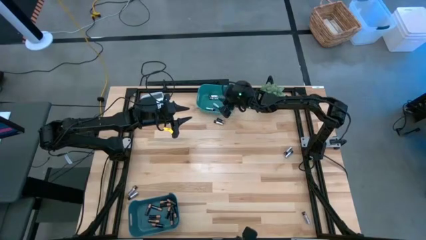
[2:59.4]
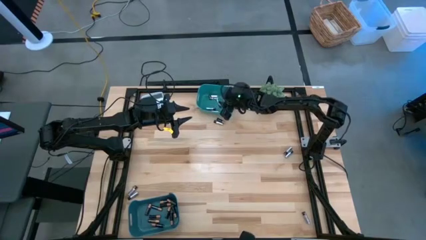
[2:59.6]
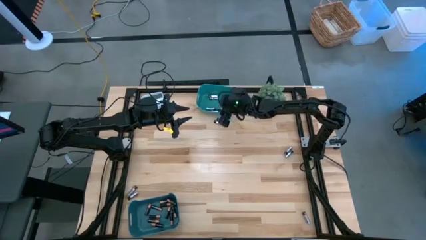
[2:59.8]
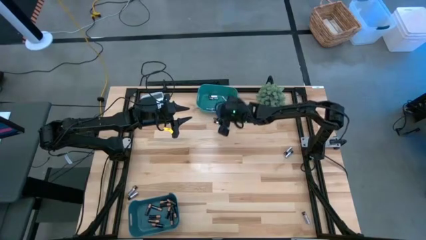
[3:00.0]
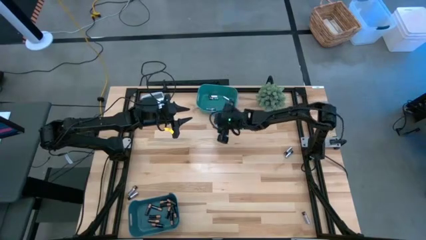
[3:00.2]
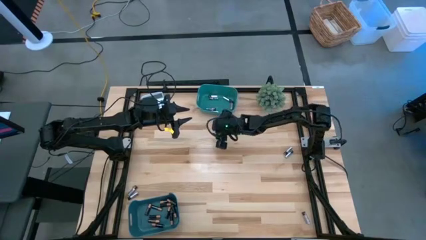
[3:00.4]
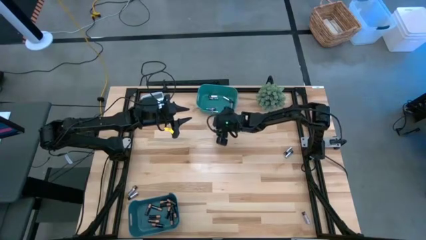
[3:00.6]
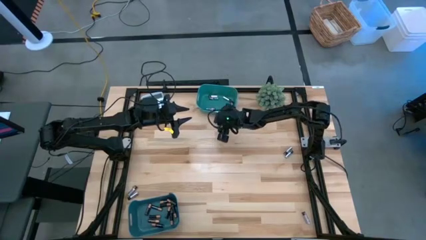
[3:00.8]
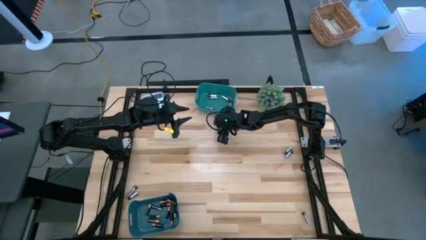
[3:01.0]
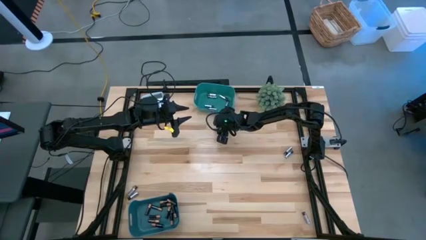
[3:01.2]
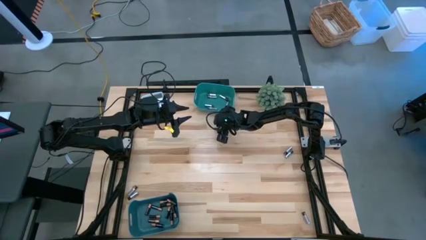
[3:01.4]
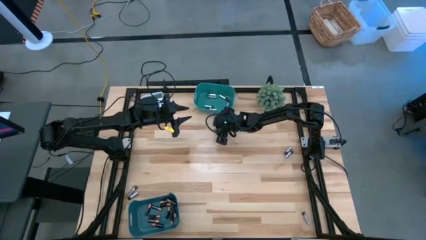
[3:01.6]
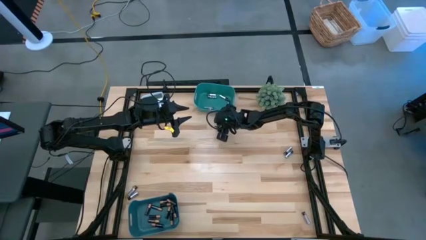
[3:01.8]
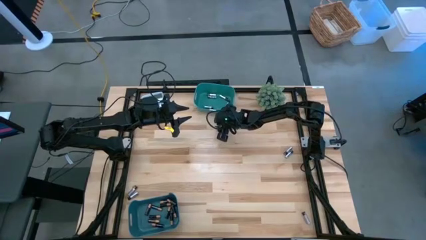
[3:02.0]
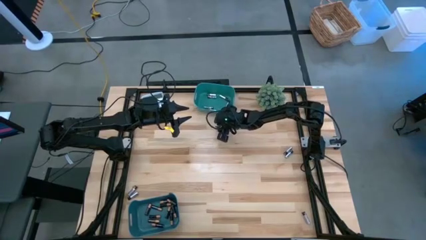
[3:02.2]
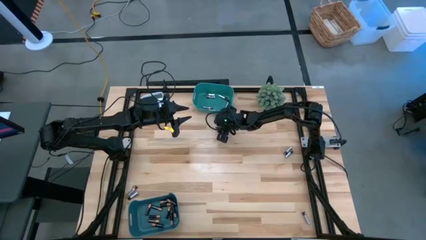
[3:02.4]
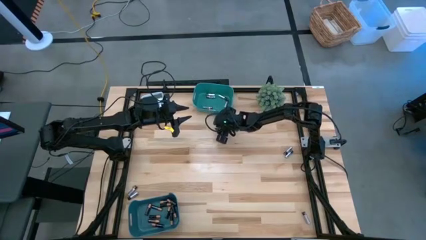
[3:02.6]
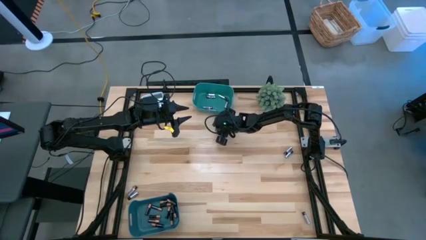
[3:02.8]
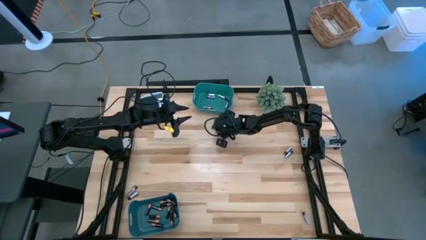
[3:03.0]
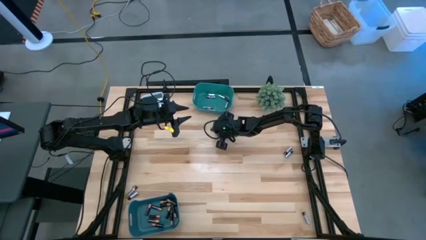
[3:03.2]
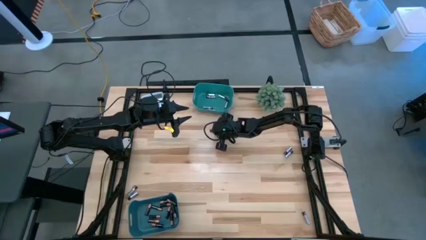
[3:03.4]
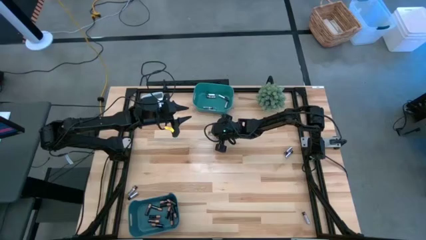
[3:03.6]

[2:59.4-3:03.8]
Task: Sort batteries
Put the silver battery into the top green bin

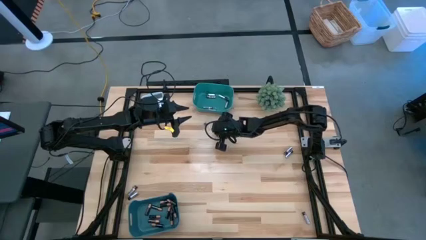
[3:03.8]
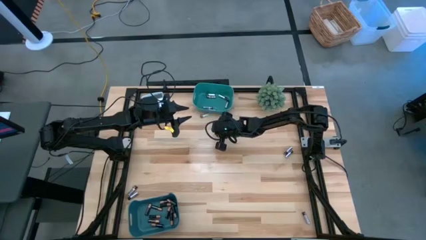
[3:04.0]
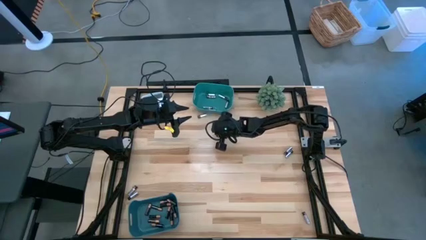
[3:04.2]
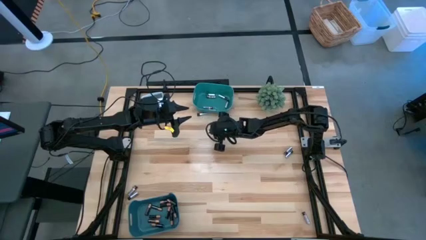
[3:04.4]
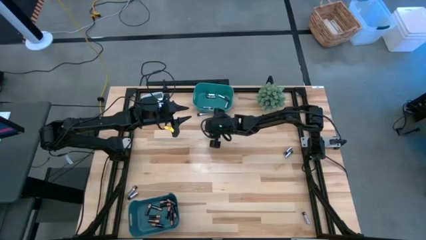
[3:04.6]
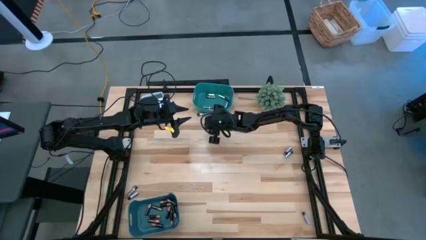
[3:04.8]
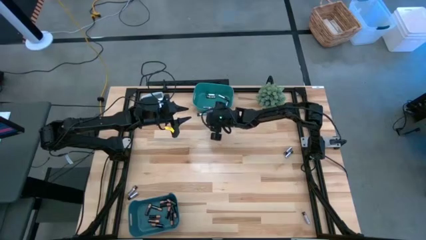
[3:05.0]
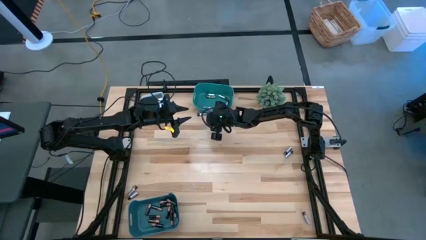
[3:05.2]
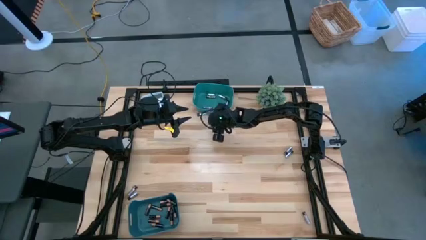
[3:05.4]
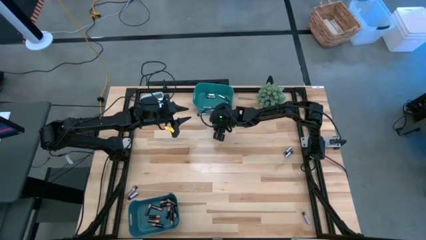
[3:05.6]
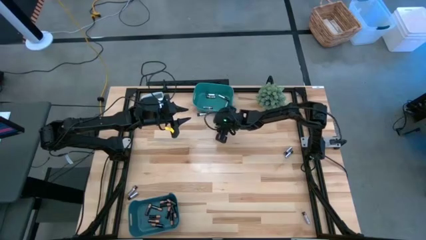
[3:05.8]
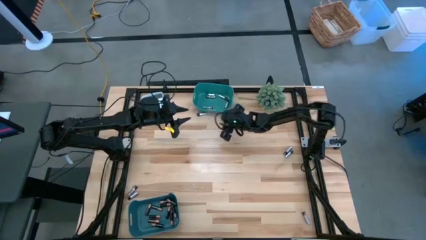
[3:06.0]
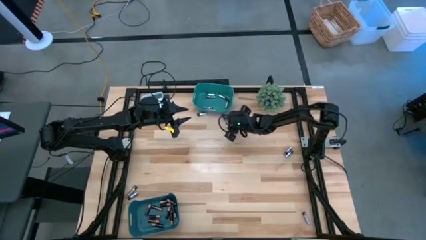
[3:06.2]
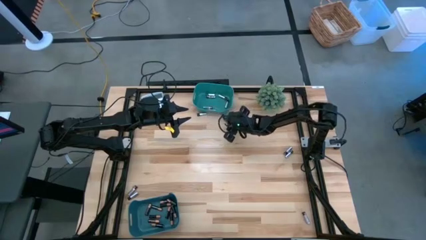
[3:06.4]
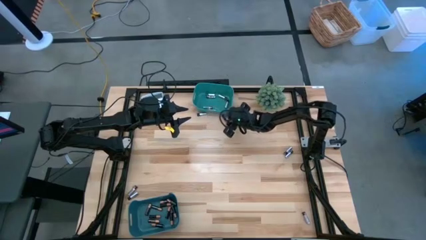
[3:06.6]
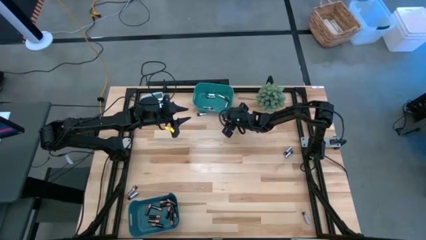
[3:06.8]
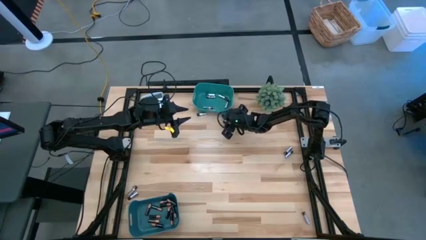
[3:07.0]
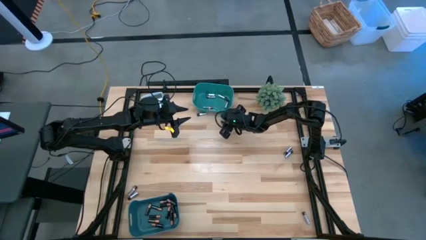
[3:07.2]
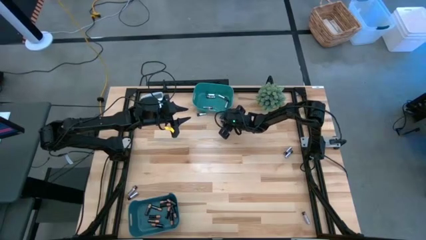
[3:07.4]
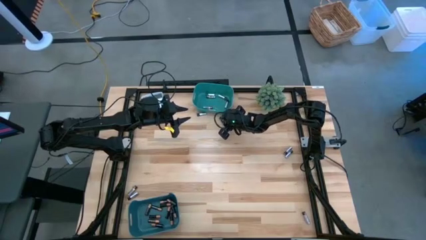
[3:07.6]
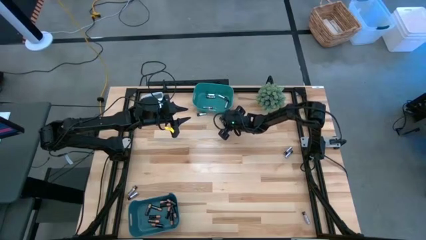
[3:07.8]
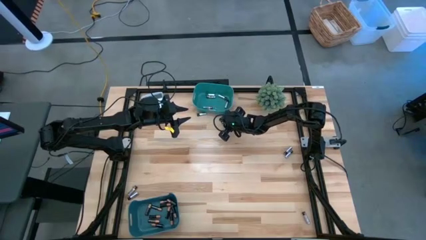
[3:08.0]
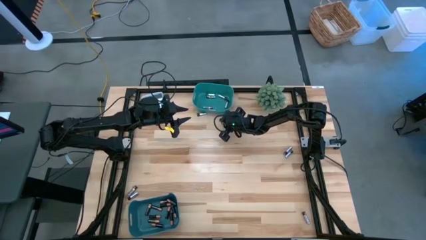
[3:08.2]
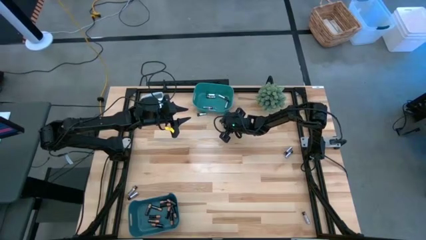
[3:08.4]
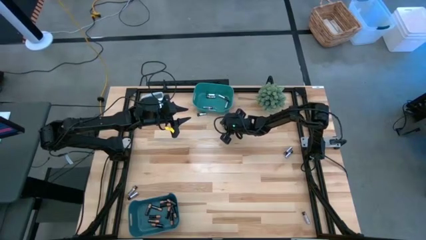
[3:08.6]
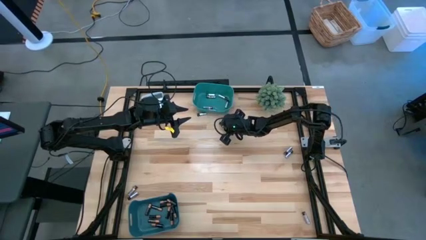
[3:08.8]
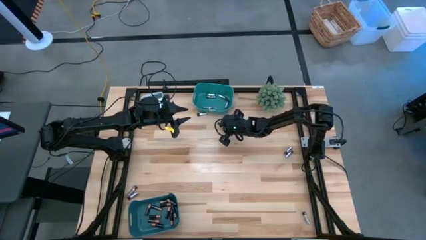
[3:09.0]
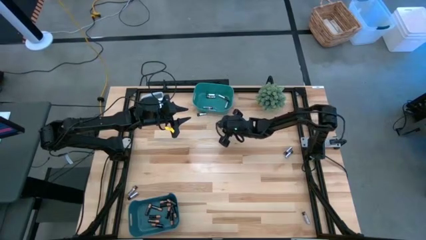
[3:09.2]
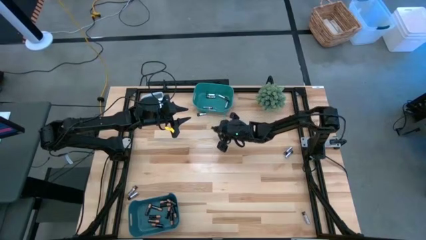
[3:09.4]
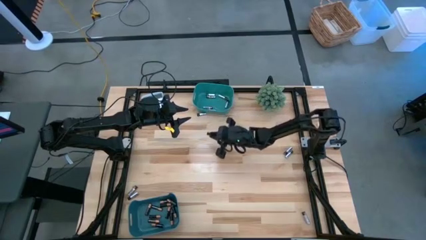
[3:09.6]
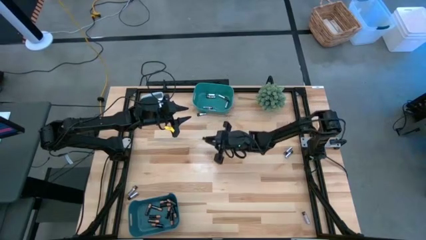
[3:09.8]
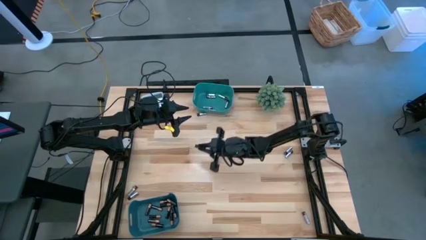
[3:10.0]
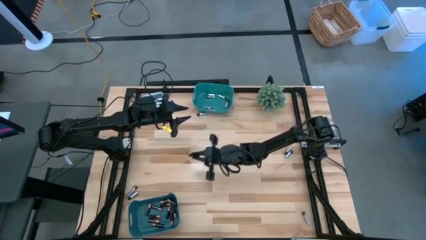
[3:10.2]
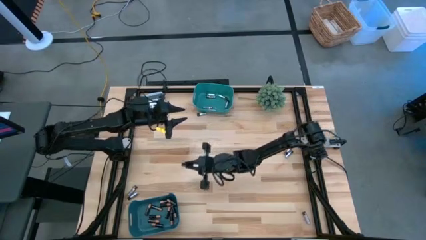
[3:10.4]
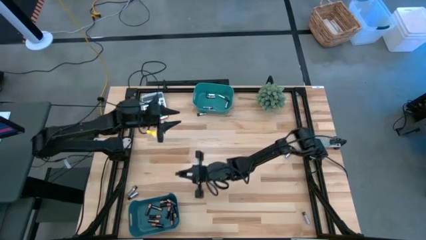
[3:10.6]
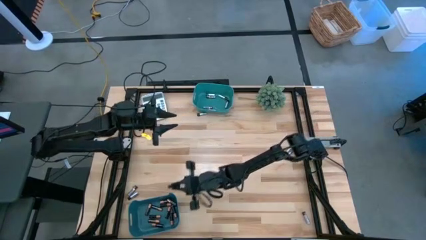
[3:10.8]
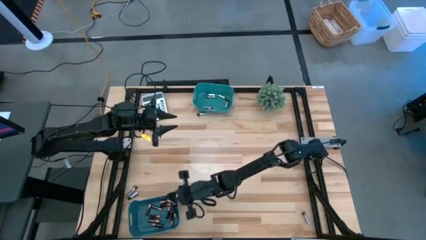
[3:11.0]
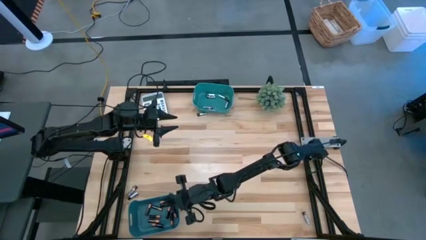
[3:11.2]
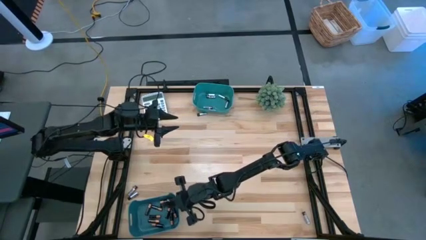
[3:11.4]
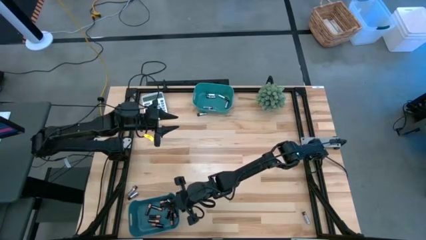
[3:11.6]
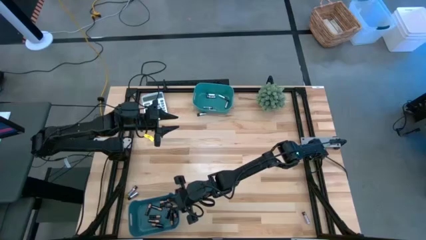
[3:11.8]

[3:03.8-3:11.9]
Put the gold battery into the bottom green bin

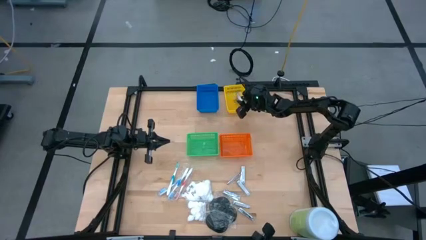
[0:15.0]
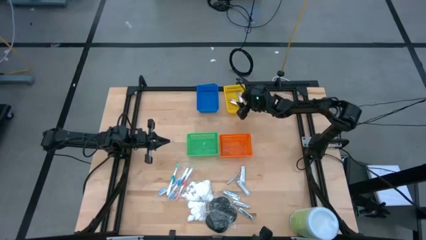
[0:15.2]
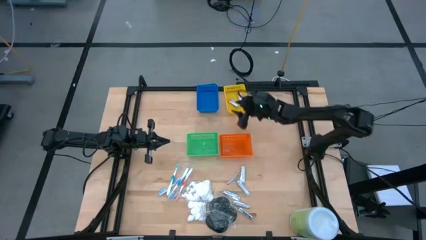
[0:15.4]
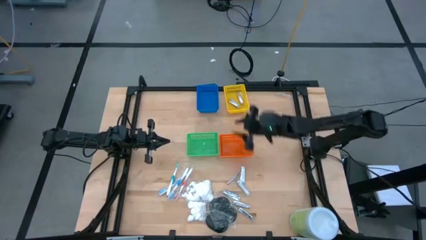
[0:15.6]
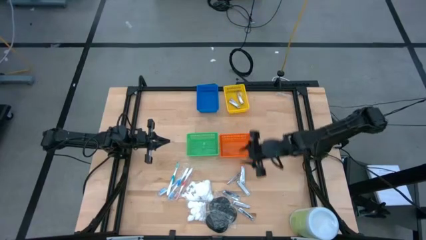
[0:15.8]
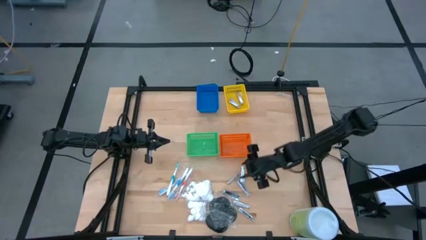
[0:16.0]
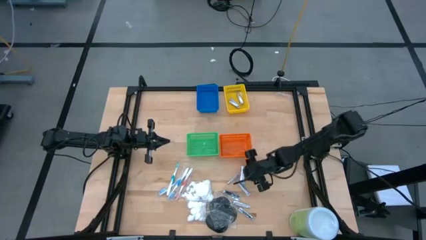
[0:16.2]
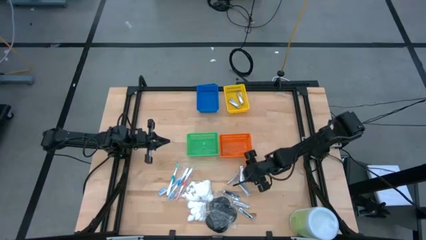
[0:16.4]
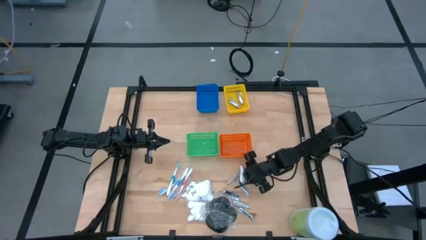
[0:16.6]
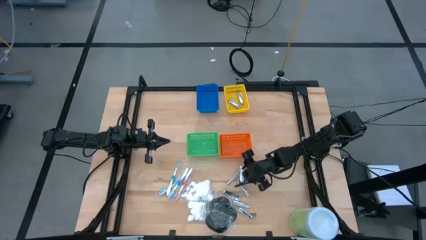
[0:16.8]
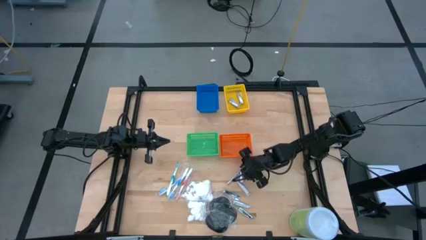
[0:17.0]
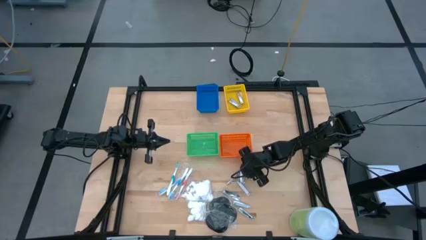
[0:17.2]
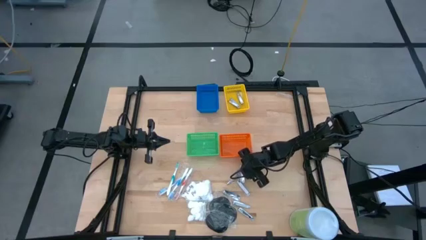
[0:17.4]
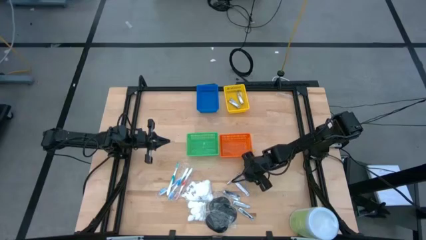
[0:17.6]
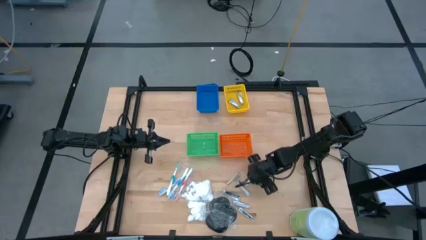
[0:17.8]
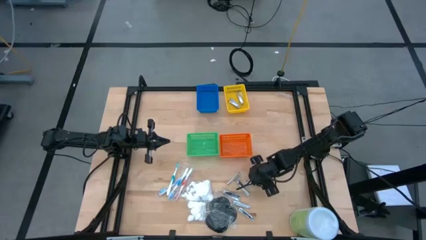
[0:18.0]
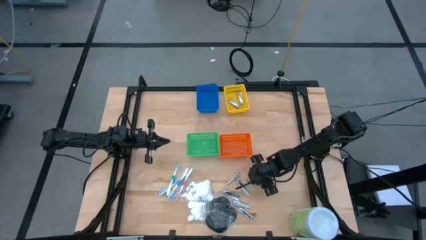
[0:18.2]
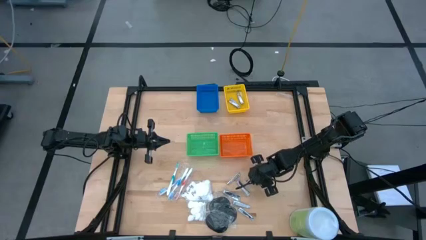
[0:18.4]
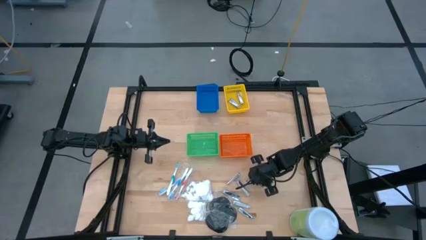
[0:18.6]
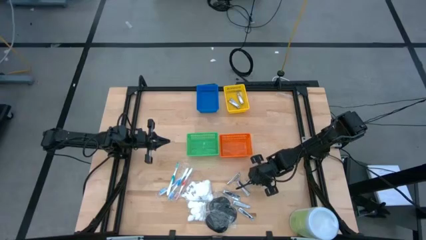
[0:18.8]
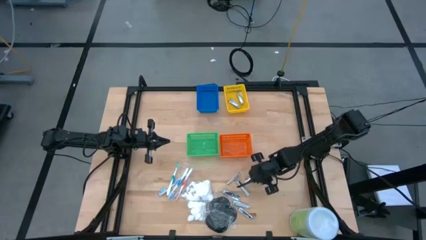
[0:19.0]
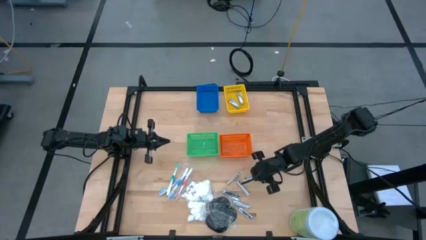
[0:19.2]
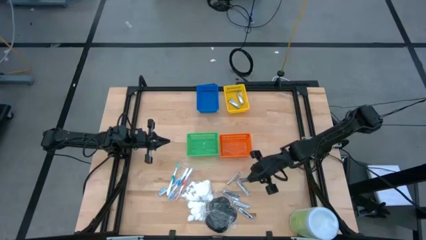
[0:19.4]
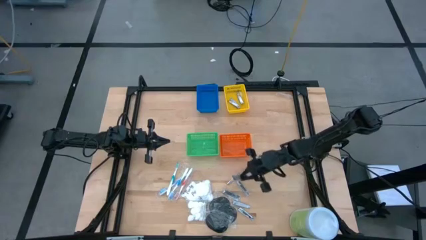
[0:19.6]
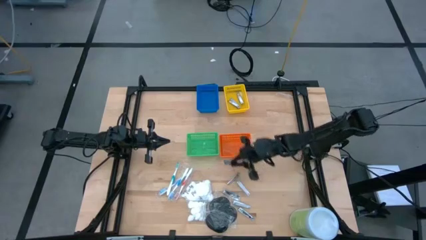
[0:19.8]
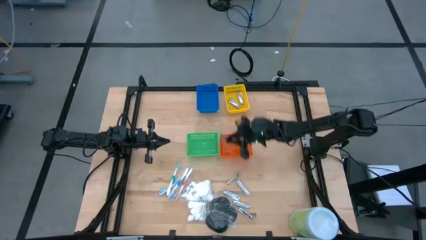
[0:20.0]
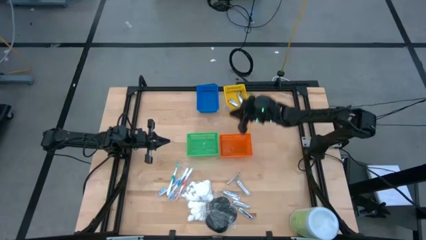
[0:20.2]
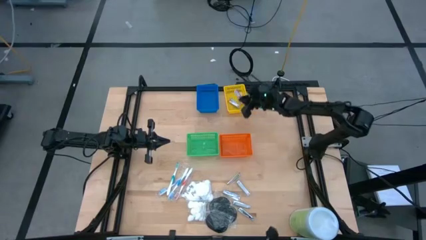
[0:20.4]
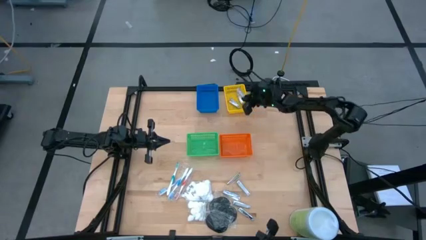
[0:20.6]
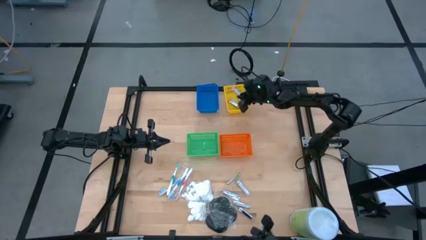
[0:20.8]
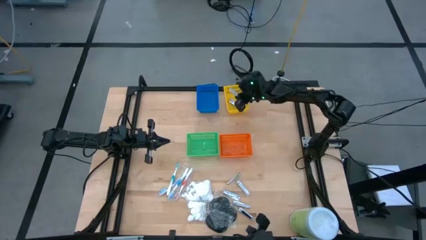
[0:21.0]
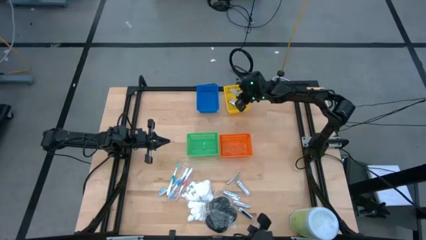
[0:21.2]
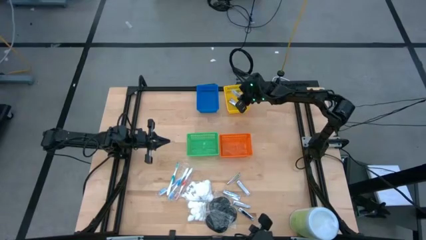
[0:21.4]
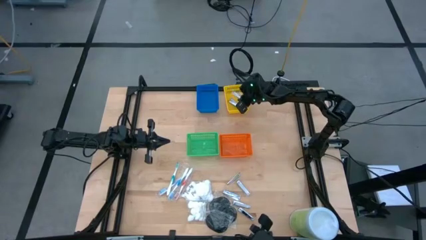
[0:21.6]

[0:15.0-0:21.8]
Task: Pick & Place Travel size toiletries
Put the nail cutter into the yellow bin
